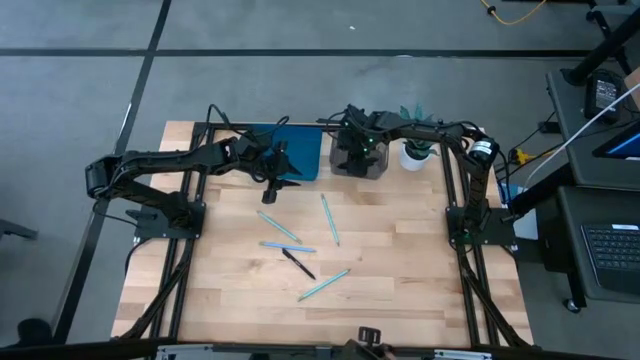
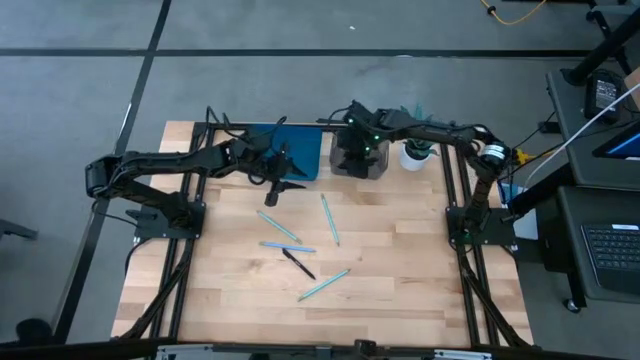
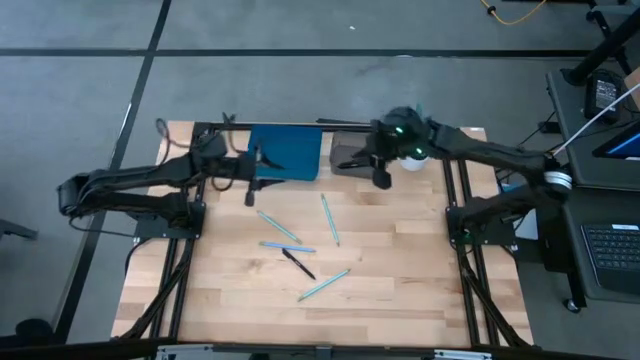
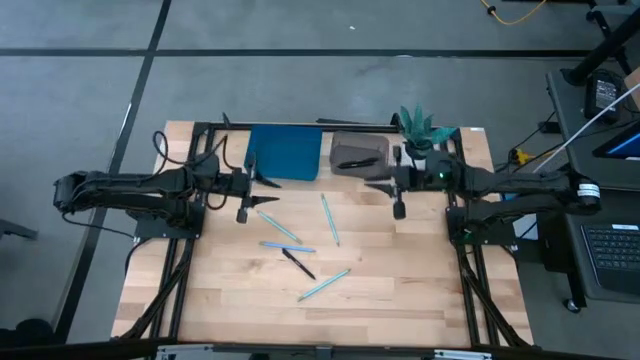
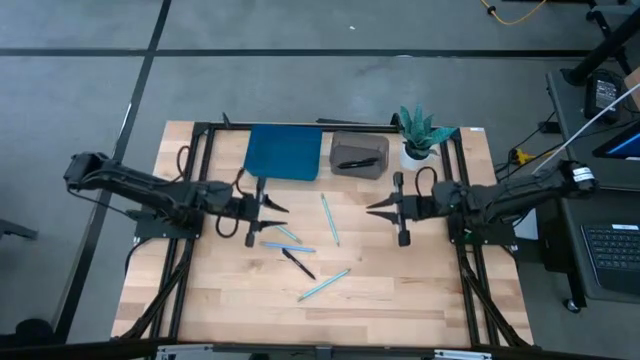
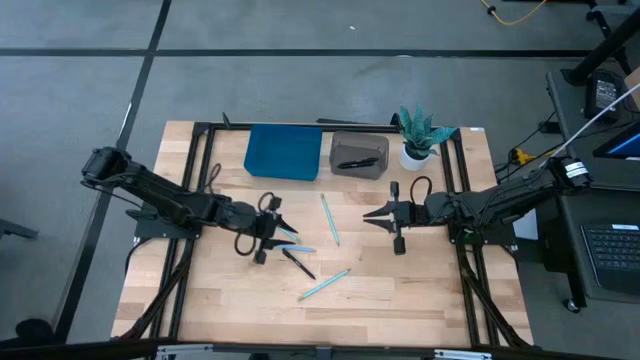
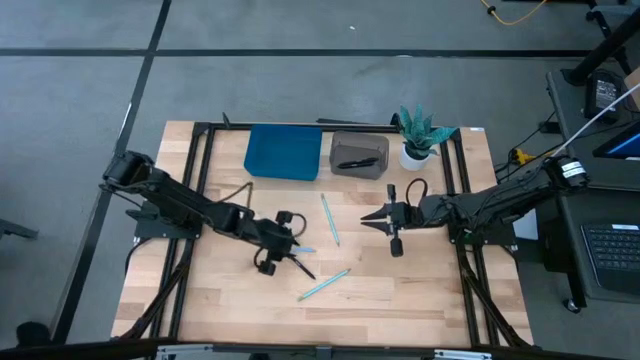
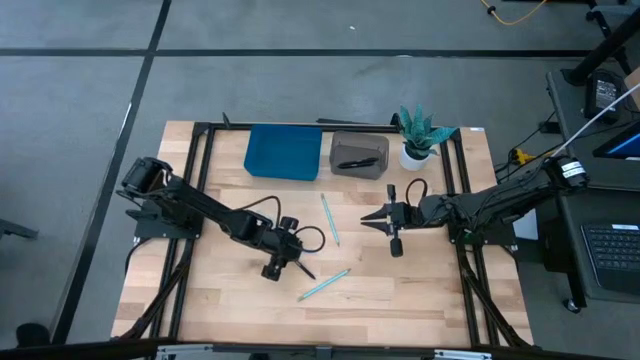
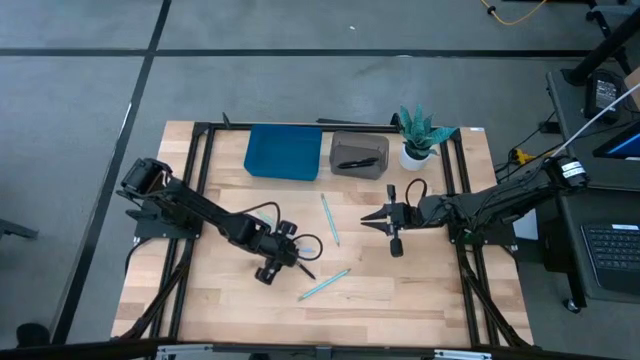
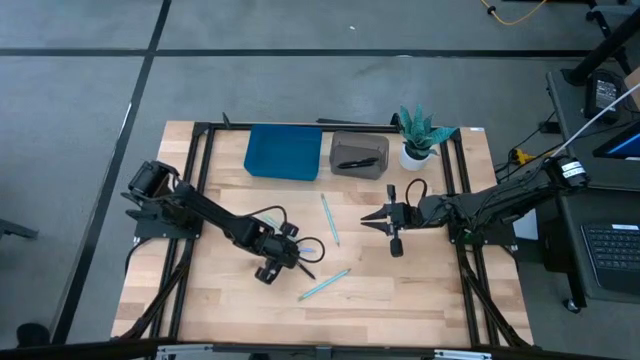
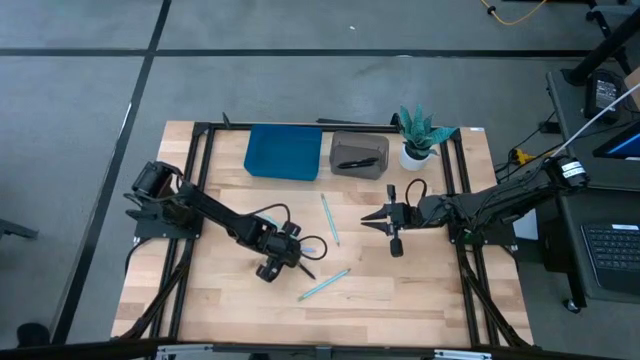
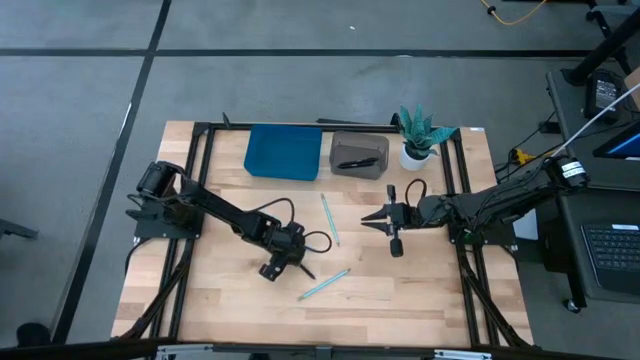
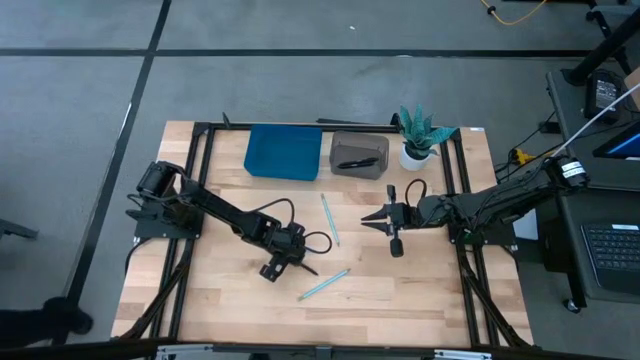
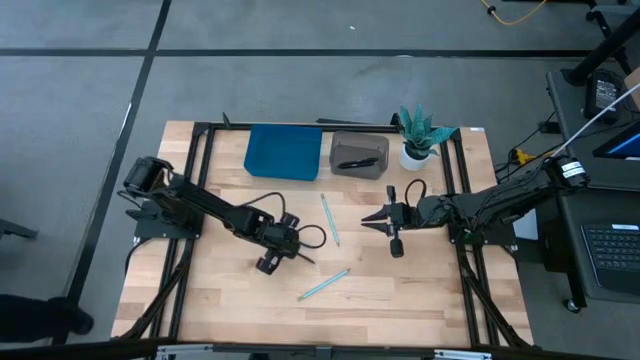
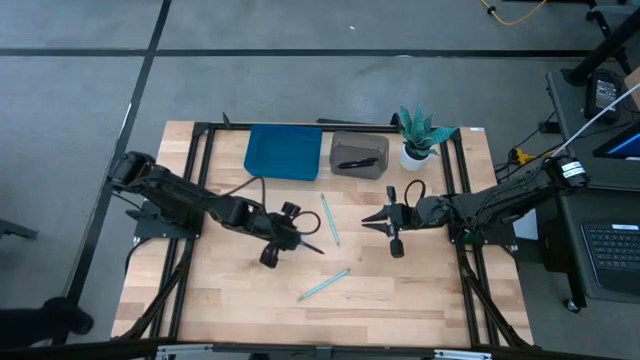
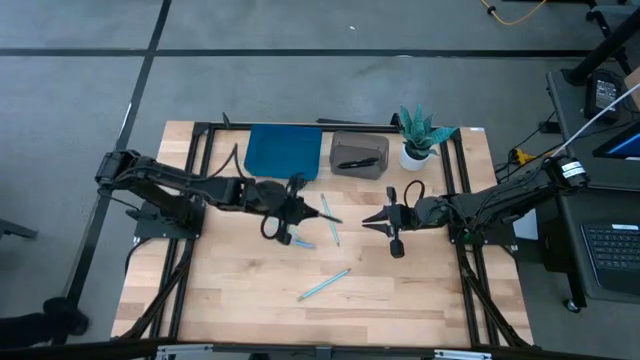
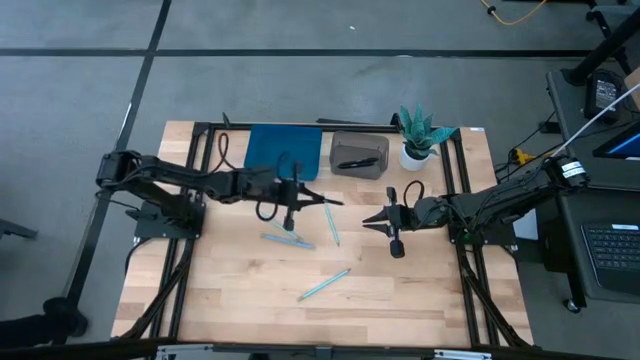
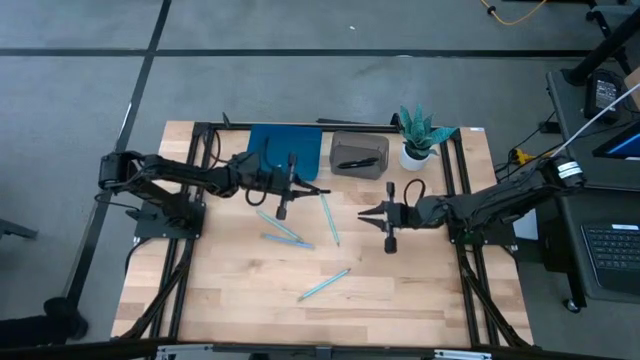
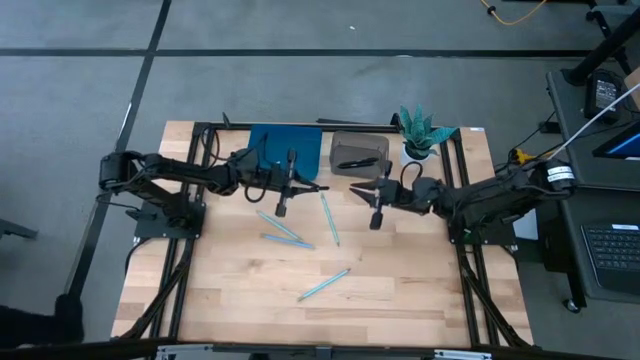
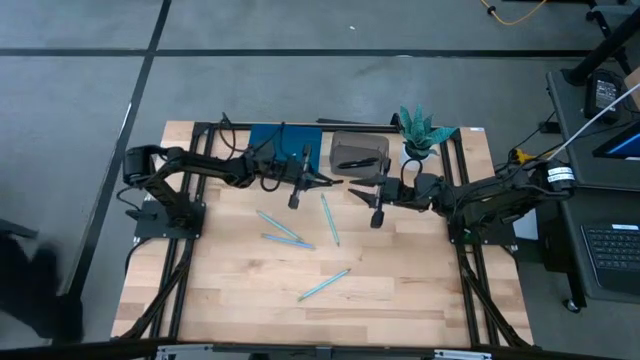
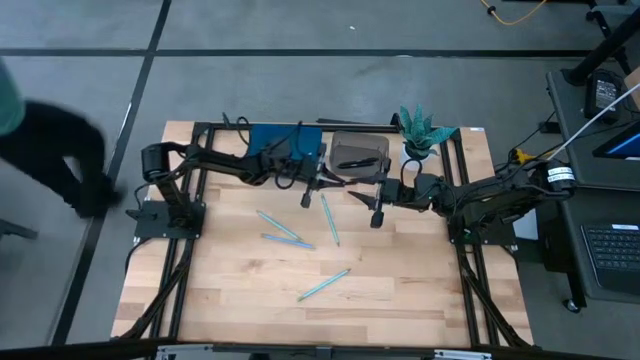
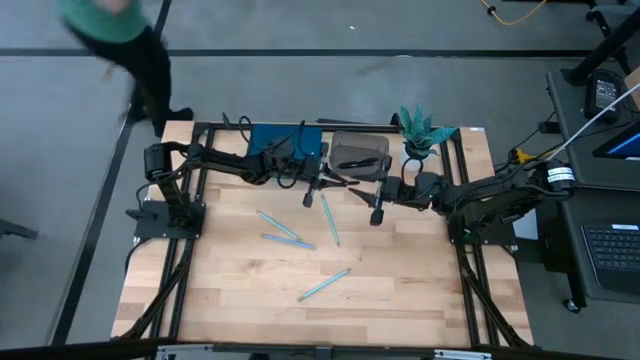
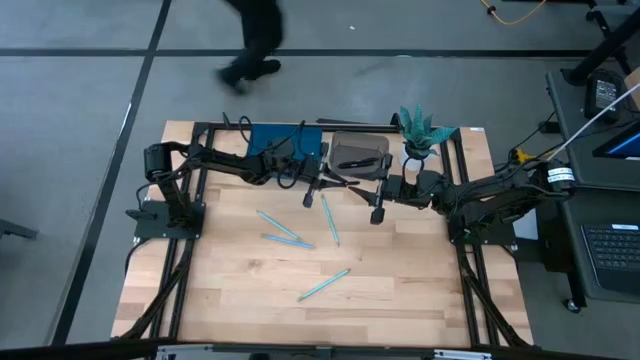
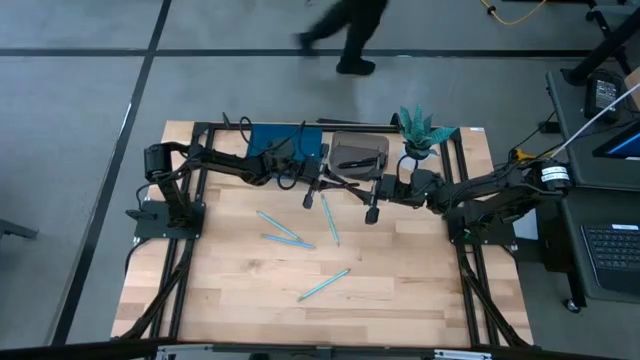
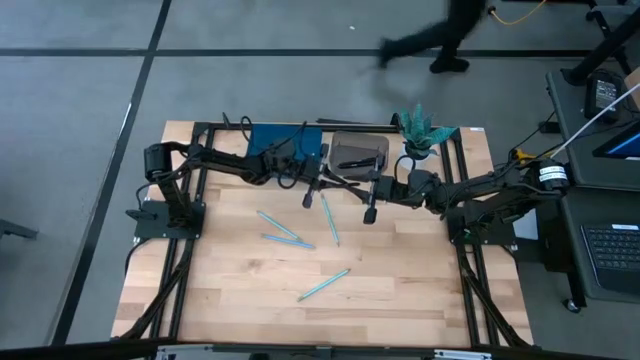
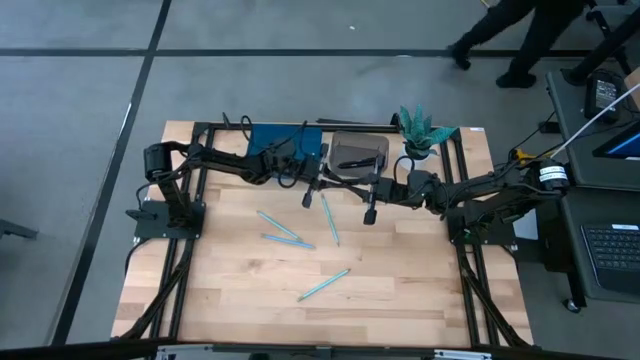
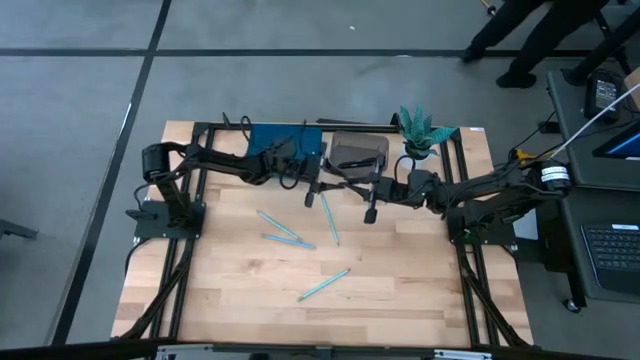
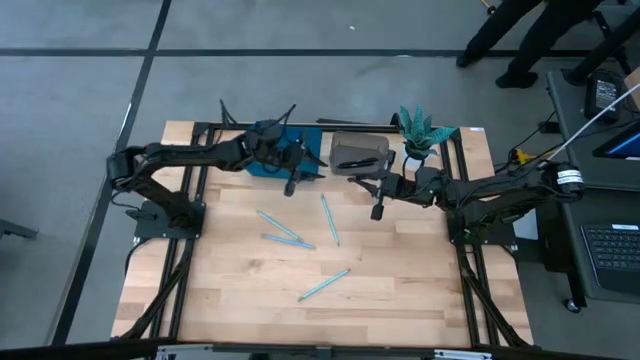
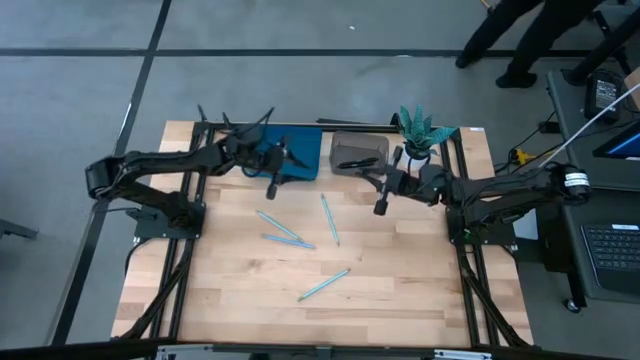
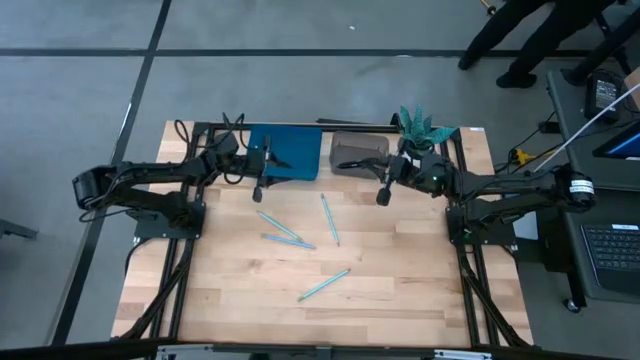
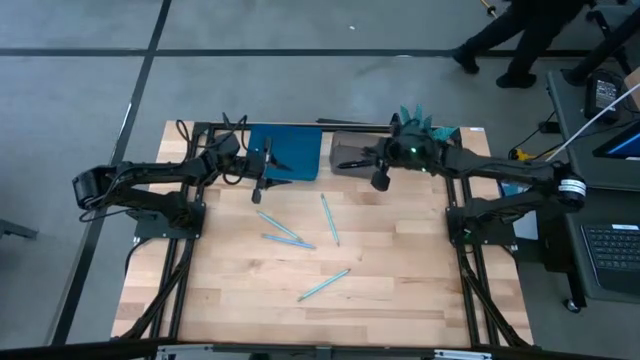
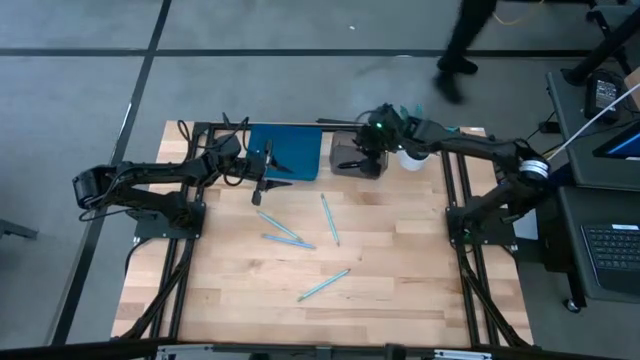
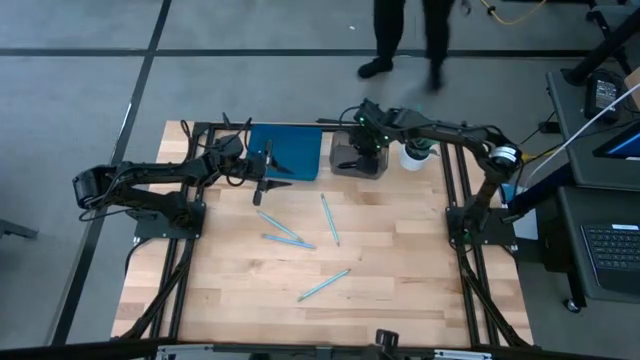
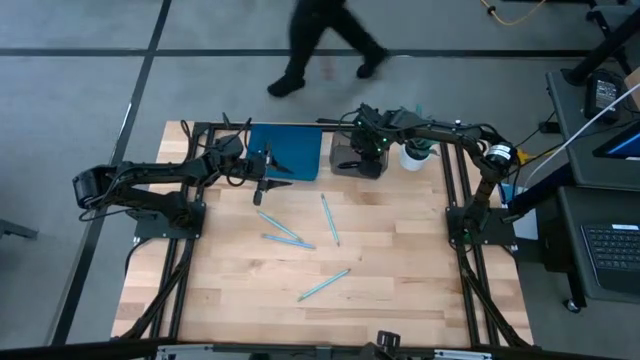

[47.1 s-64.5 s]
Task: Sort pens & pencils
Put the black pen into the black bin

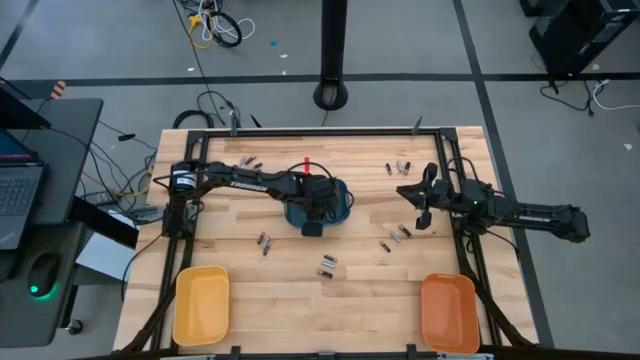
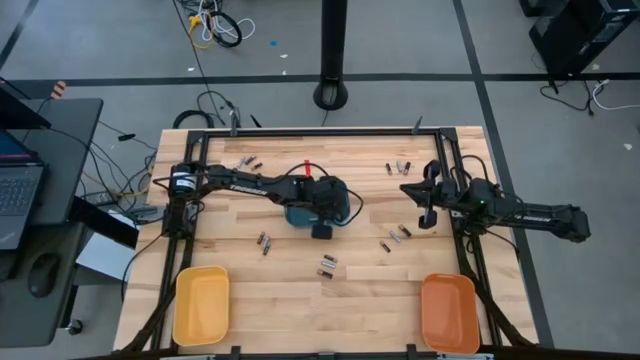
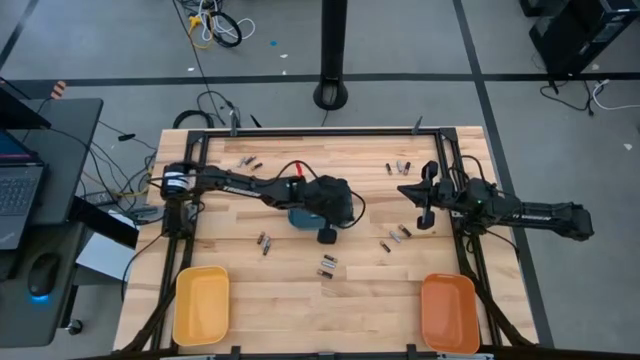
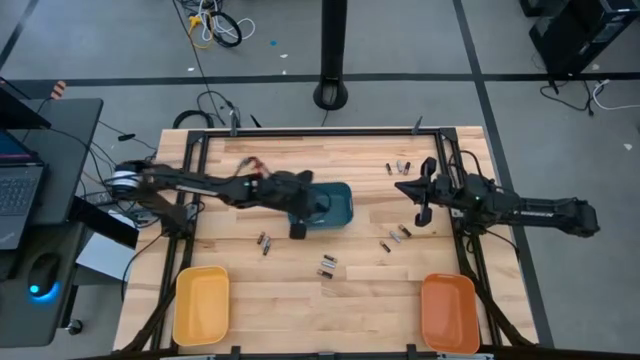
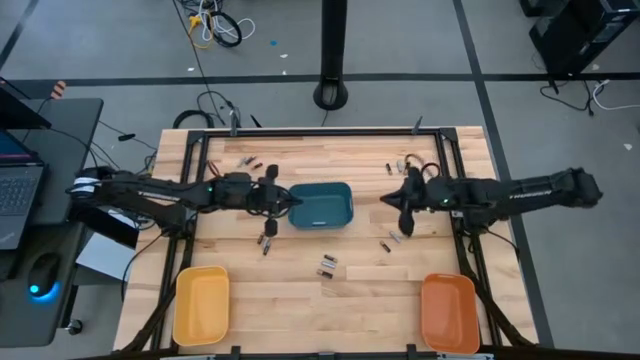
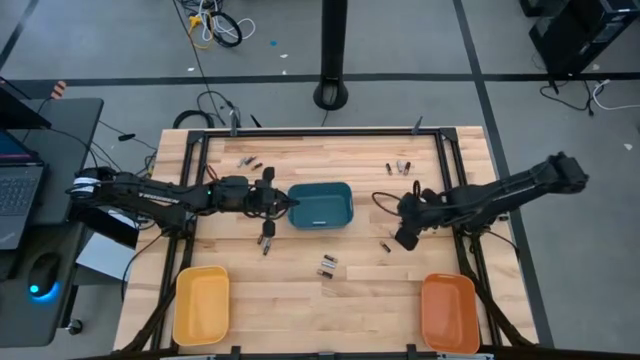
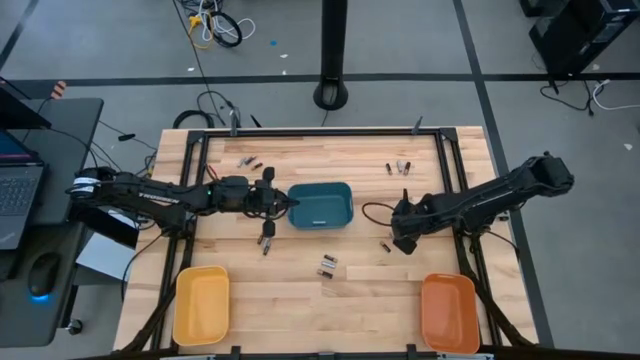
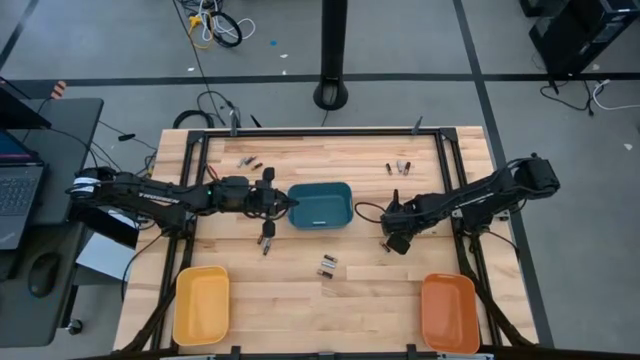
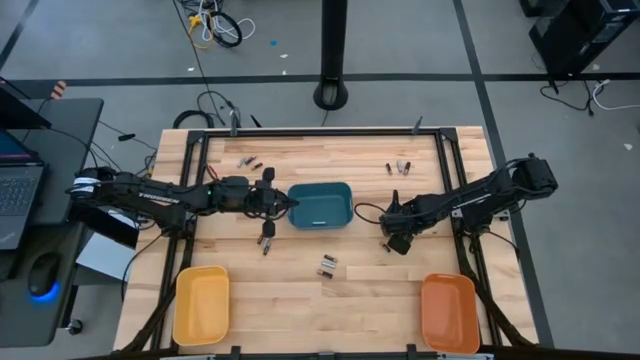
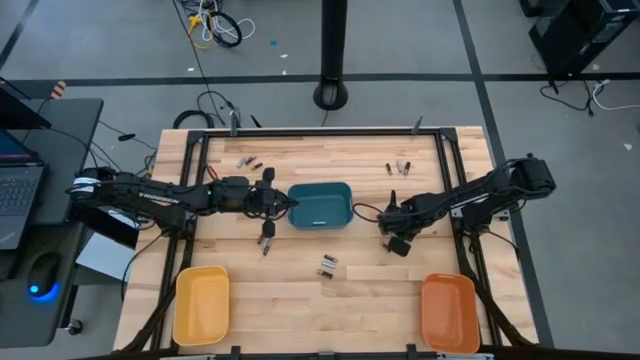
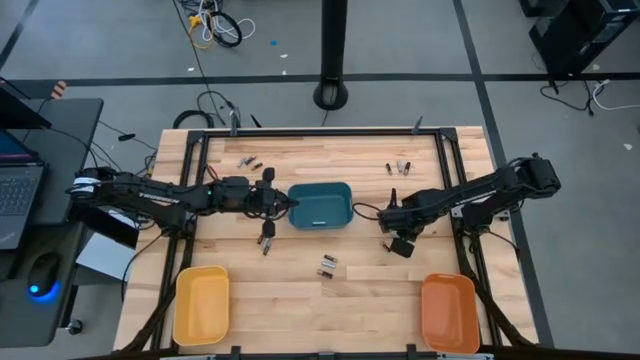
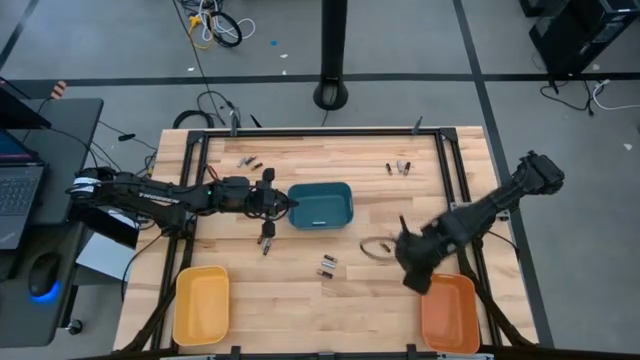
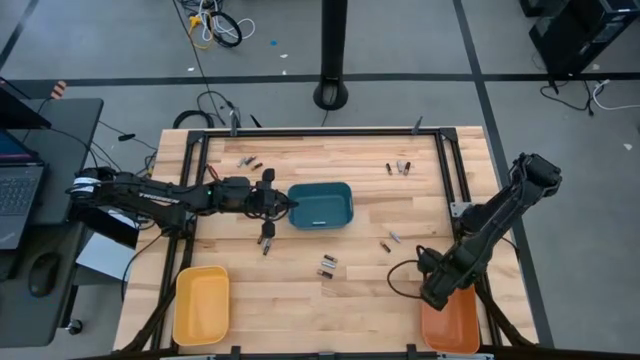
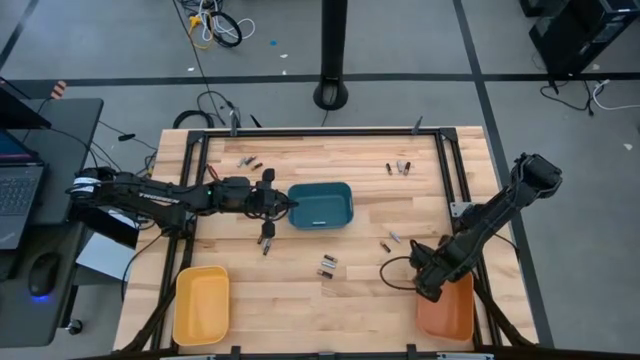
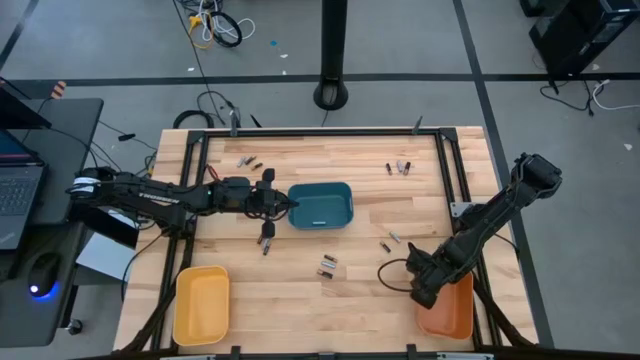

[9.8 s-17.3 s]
Task: Sort batteries
Put the large black battery into the orange bin
